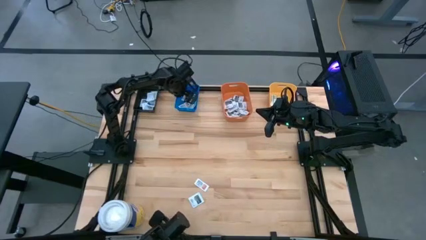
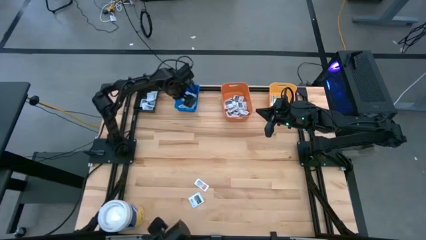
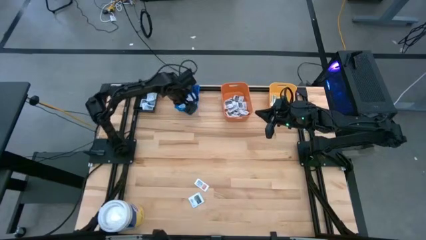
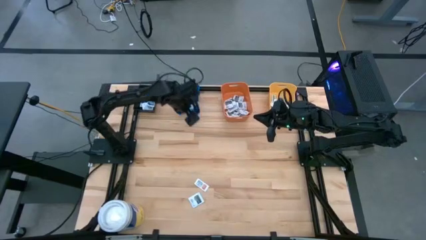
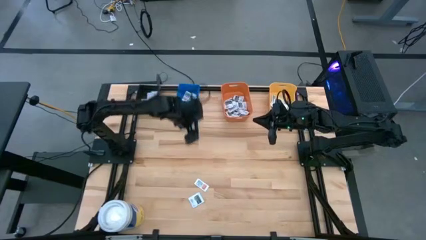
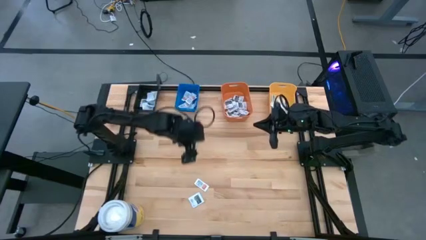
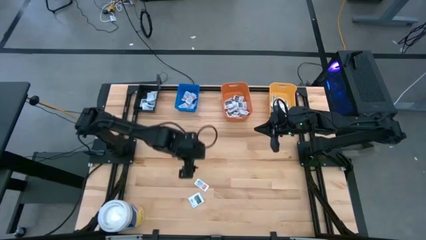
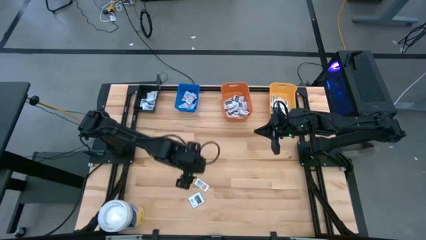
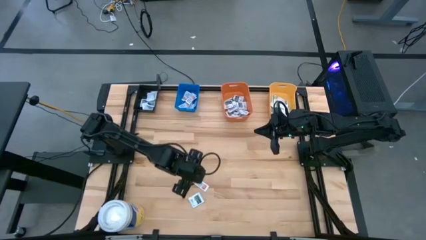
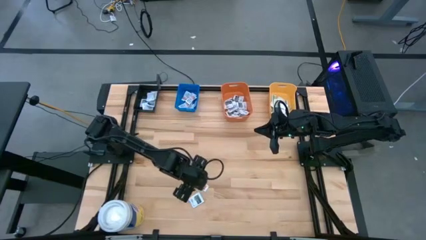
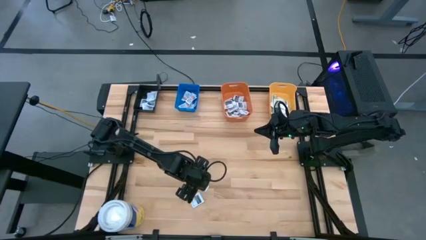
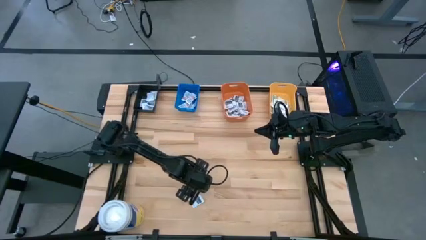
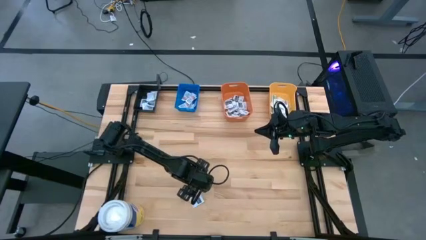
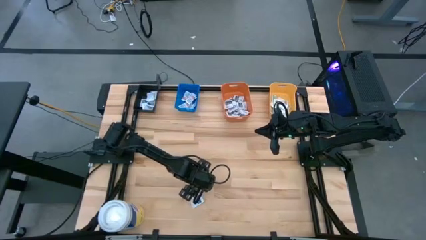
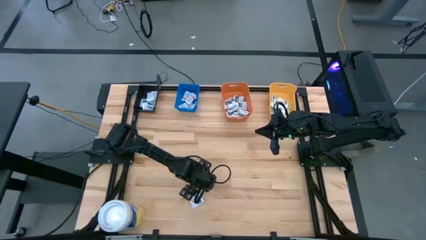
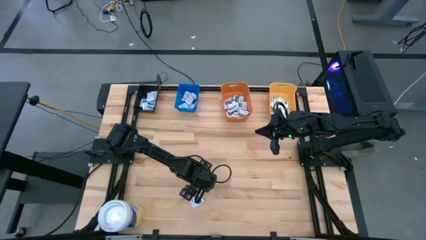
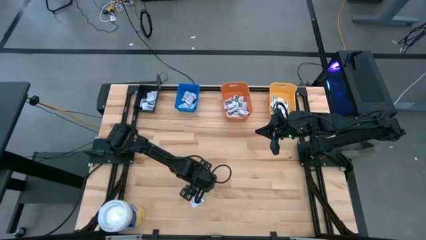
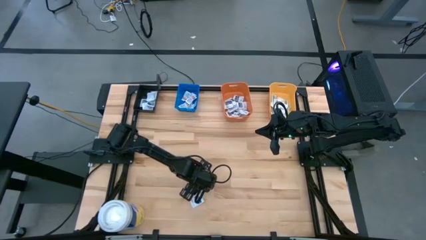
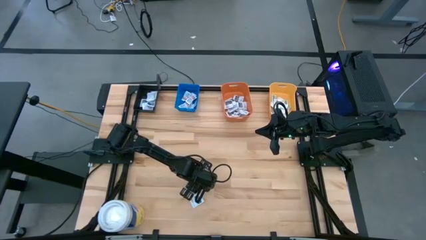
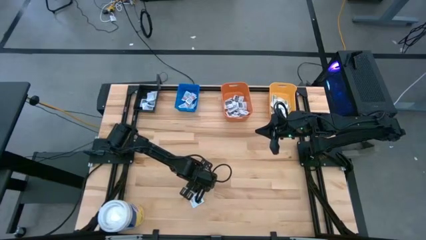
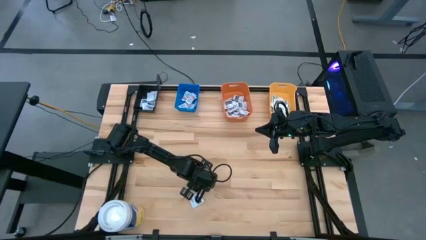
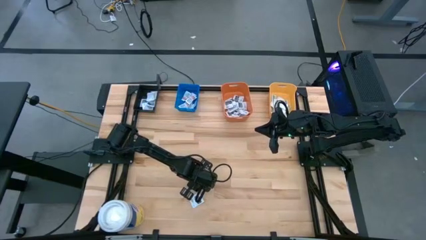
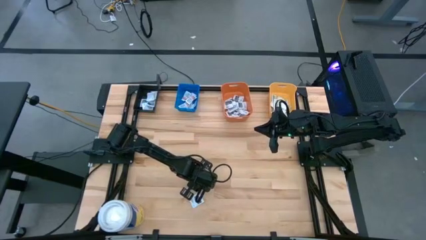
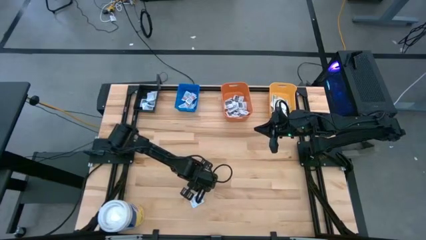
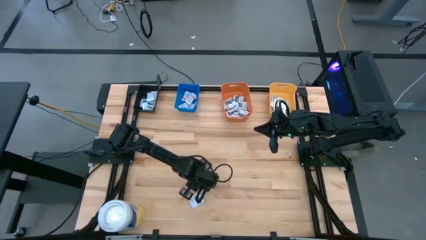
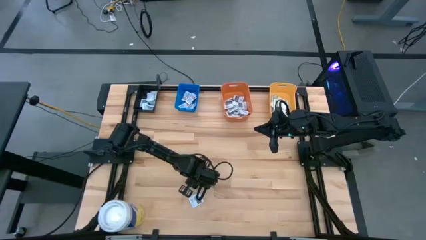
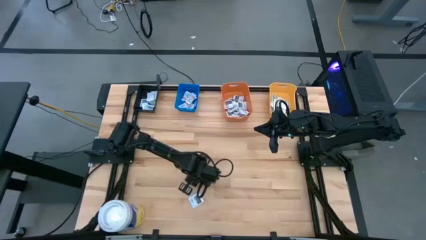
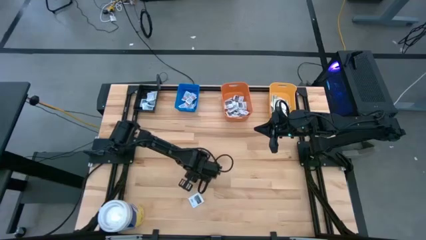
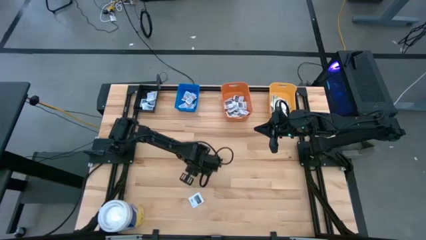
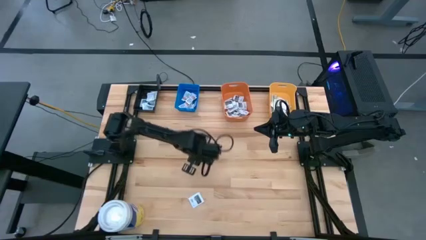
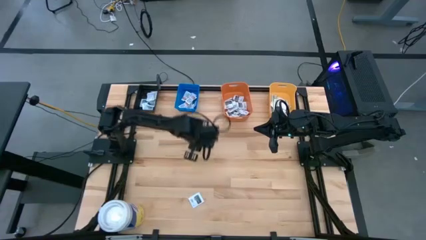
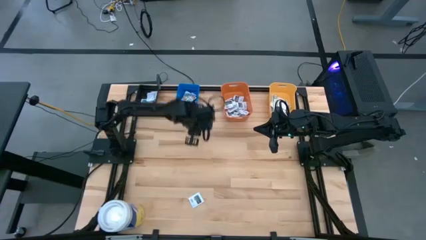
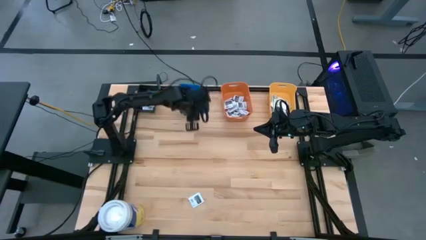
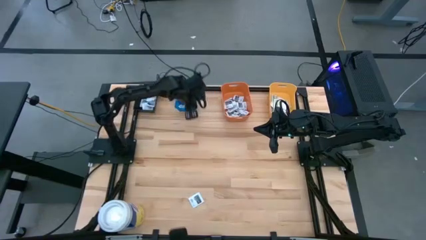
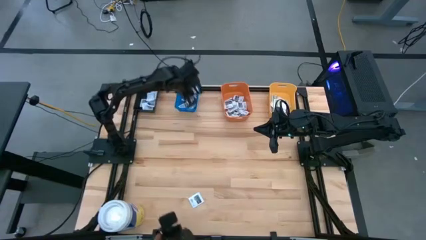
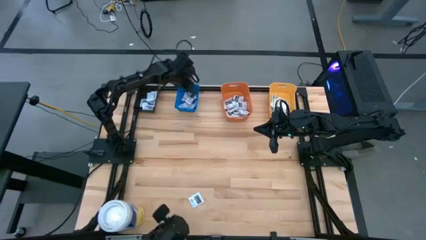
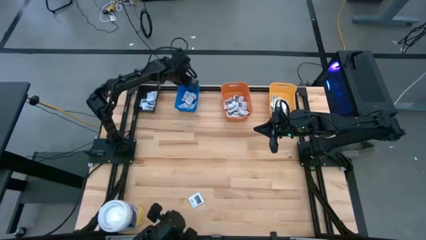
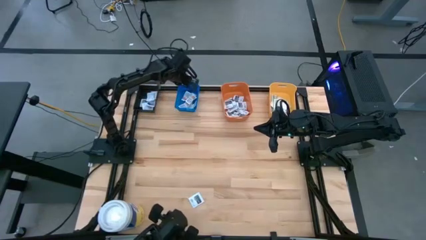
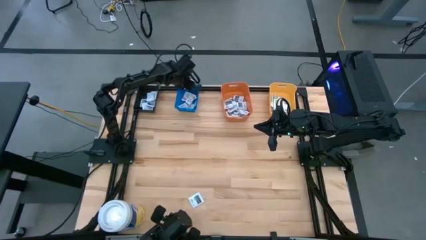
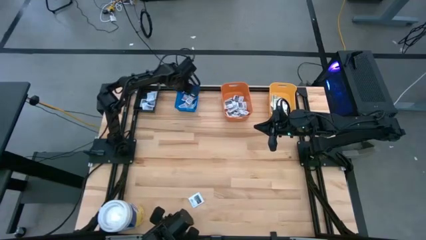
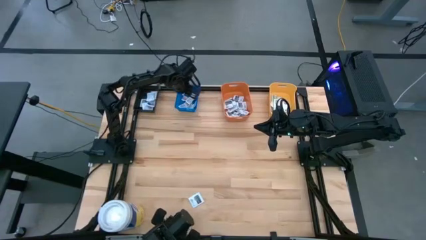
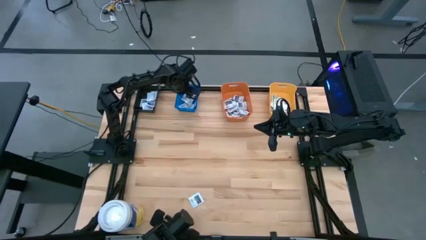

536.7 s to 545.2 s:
Task: Pick & Place First Aid Supplies
Put the ointment pack into the blue bin

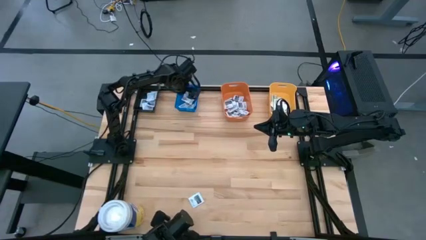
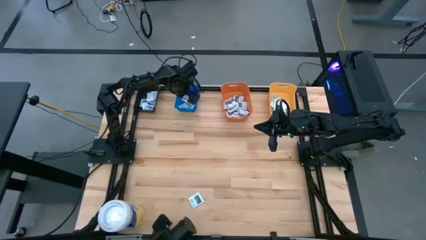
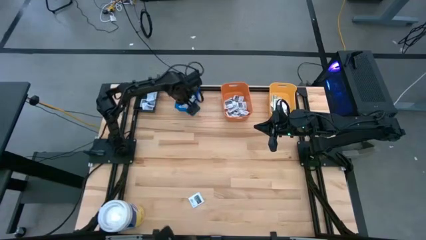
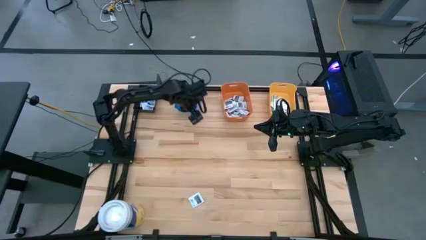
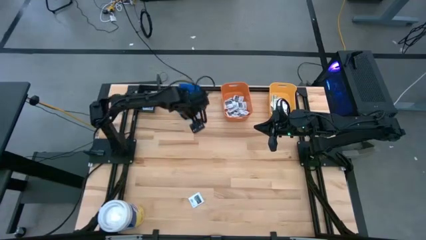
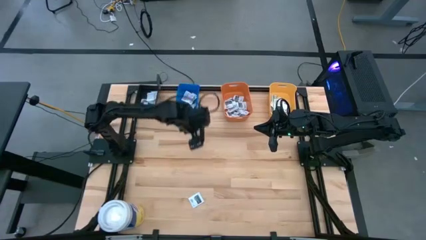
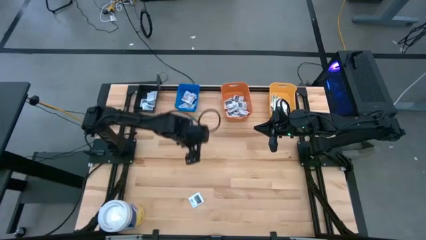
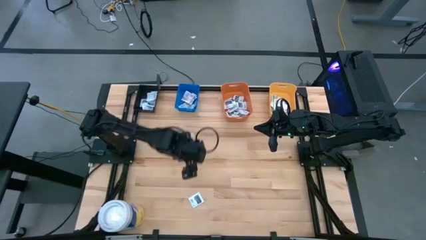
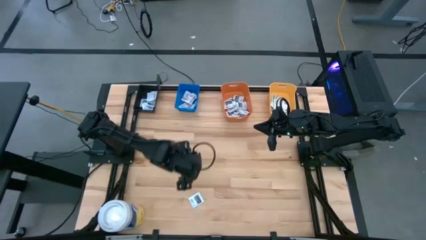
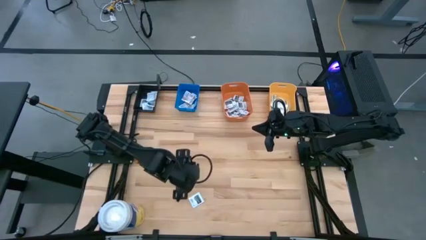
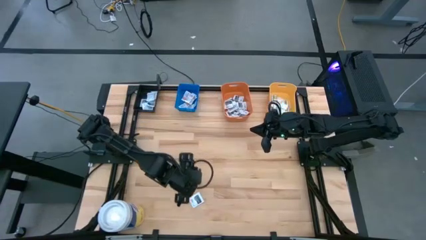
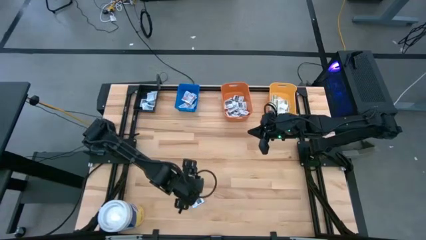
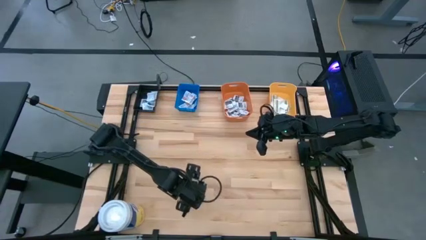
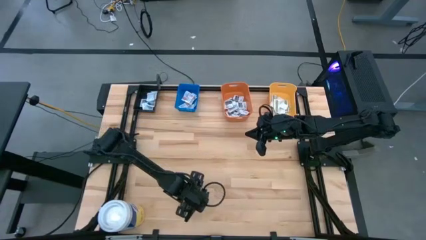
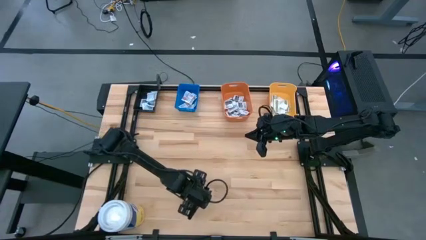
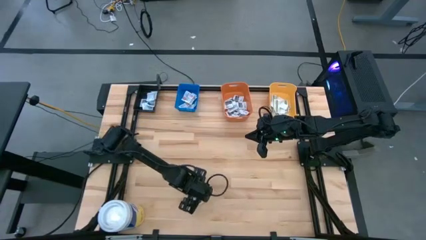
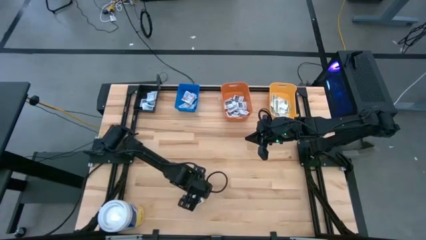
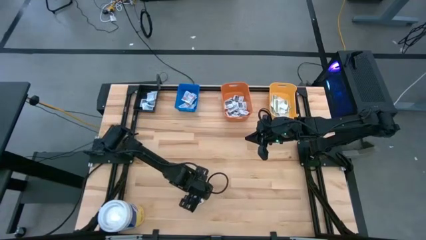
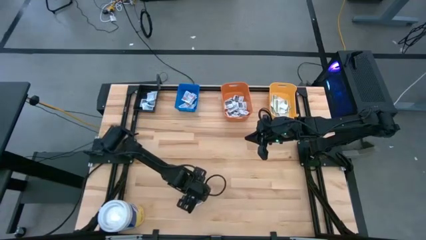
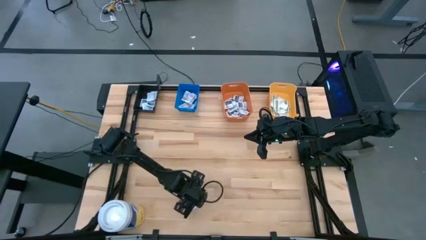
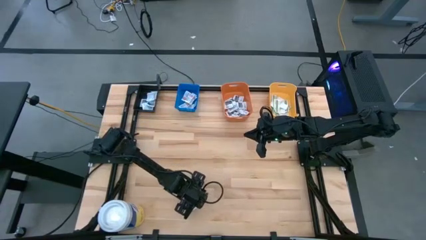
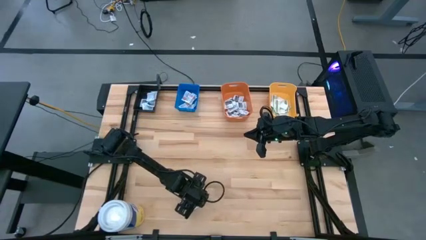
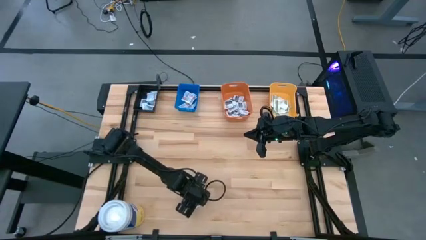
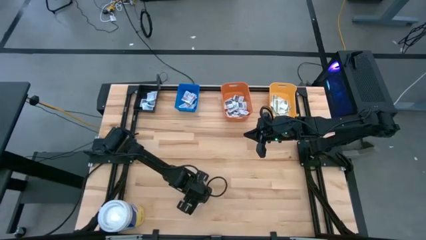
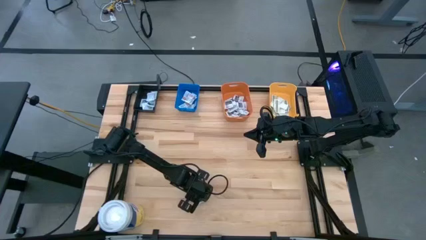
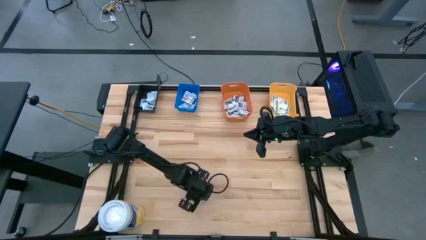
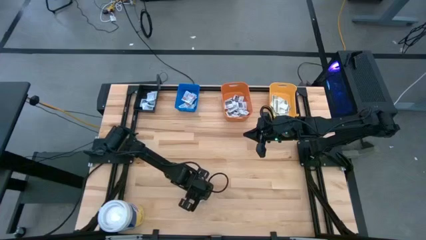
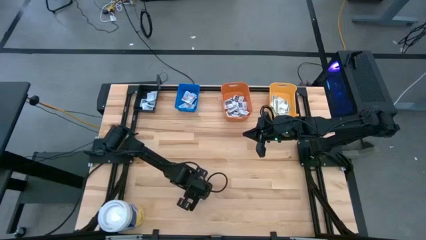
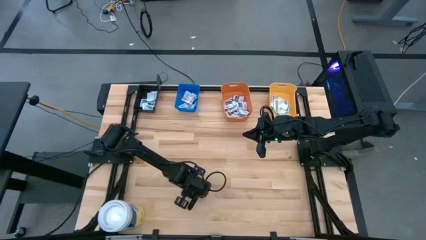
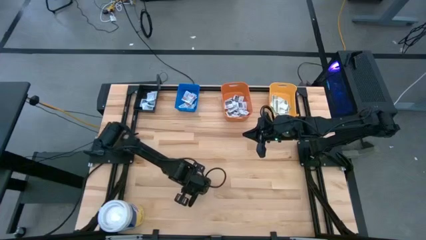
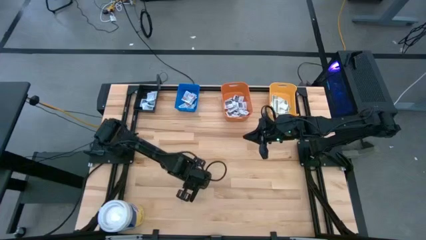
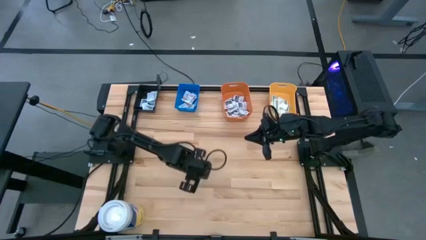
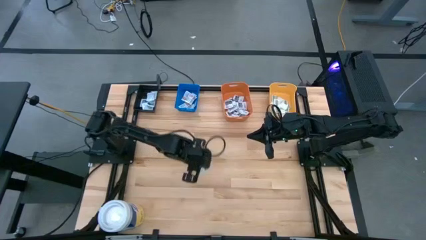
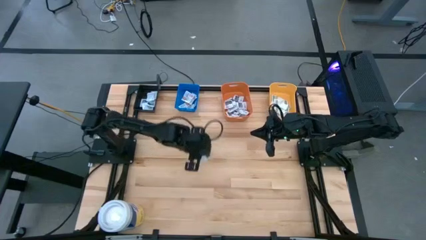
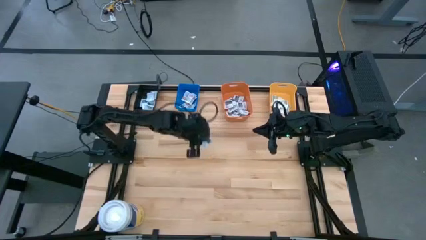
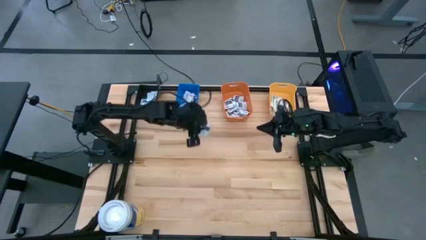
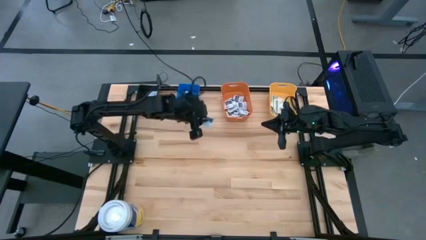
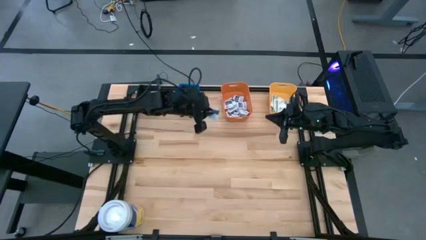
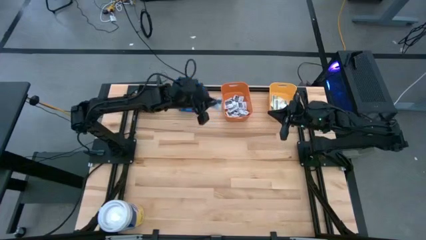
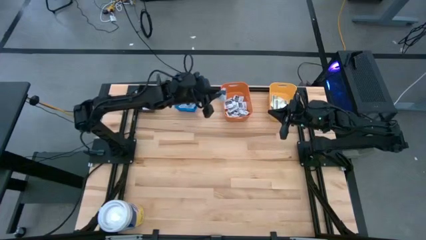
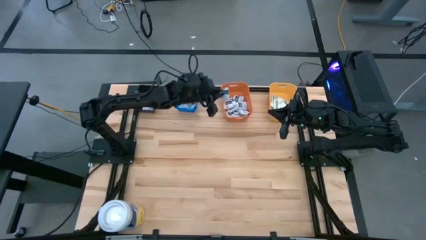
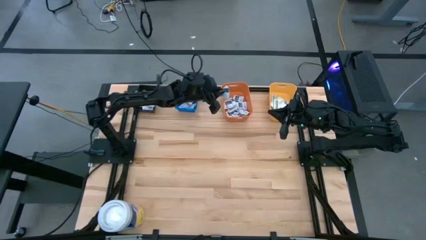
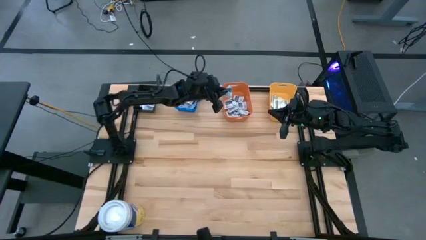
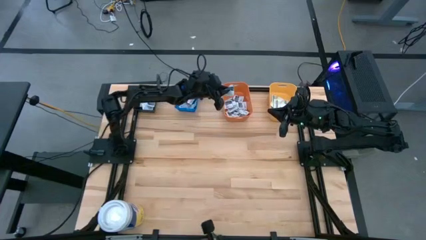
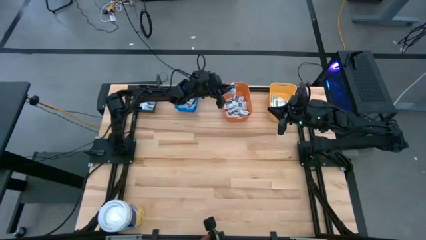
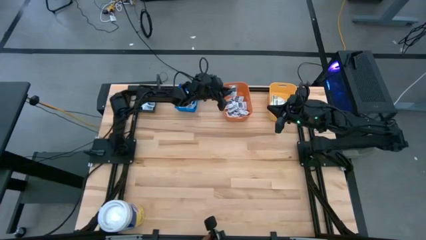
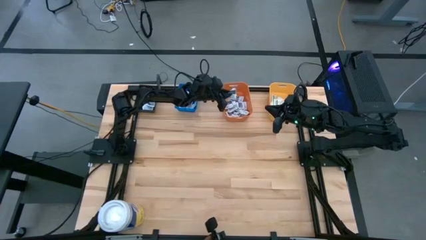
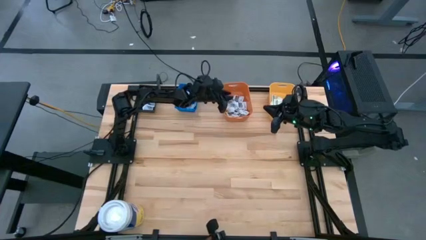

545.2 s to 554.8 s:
Put the towelette pack into the orange bin
